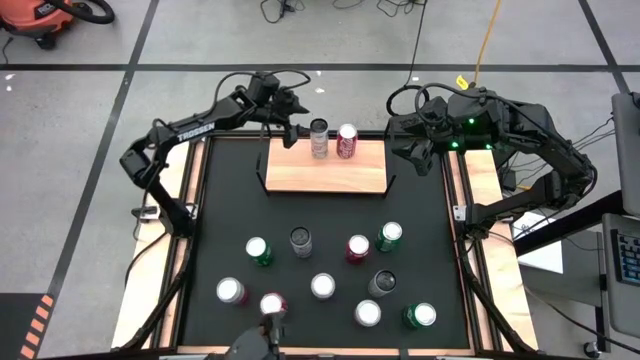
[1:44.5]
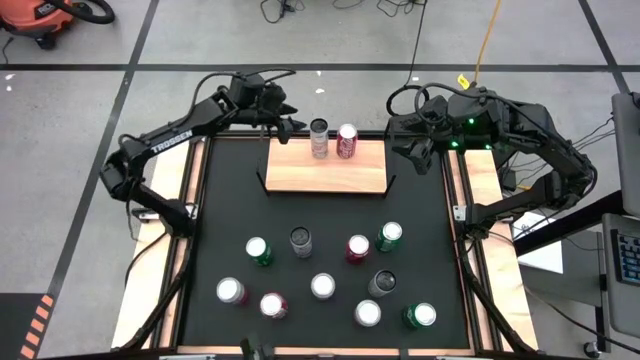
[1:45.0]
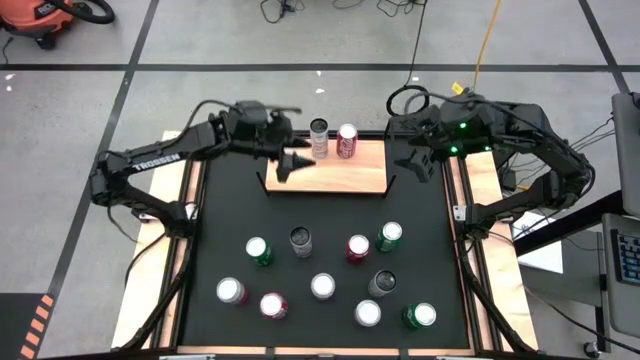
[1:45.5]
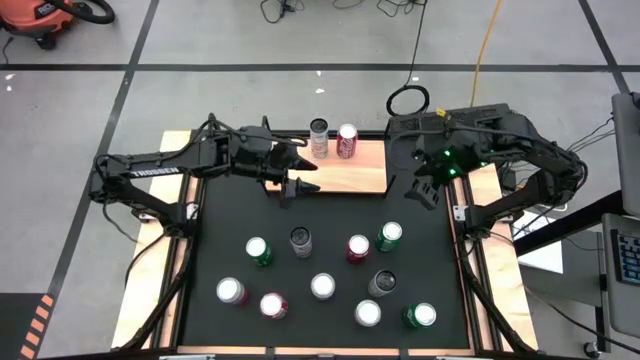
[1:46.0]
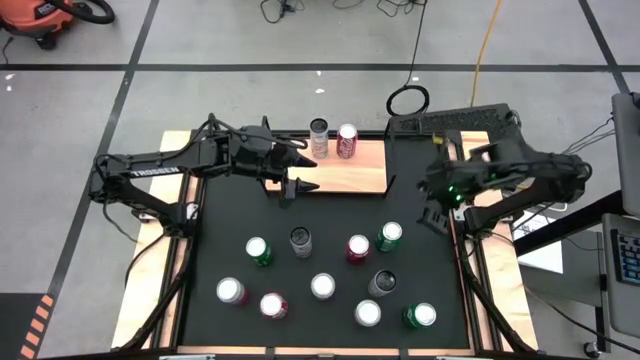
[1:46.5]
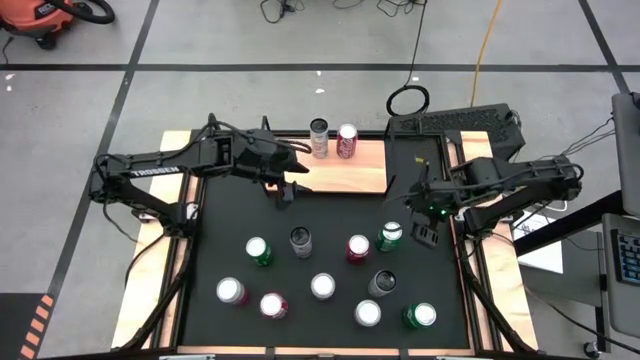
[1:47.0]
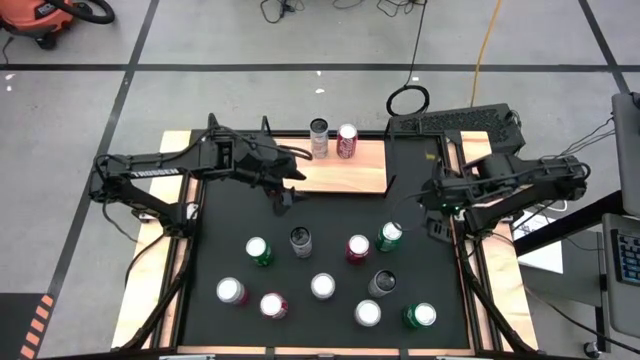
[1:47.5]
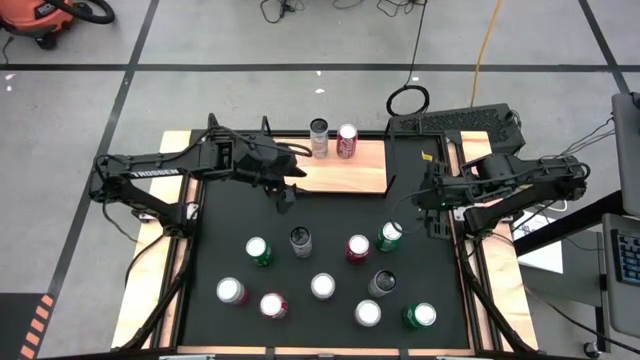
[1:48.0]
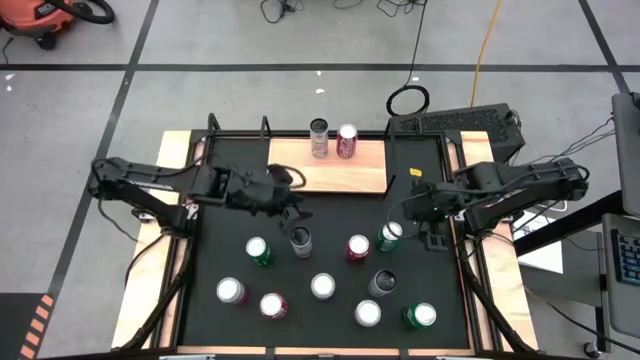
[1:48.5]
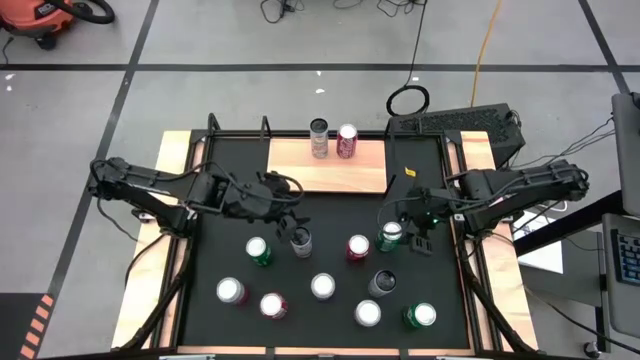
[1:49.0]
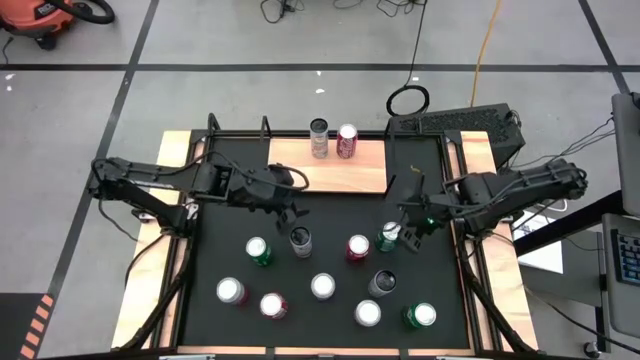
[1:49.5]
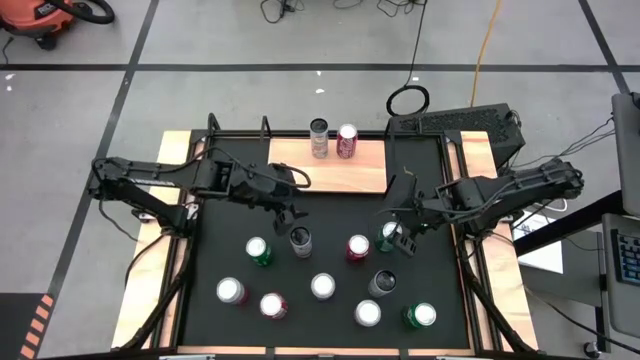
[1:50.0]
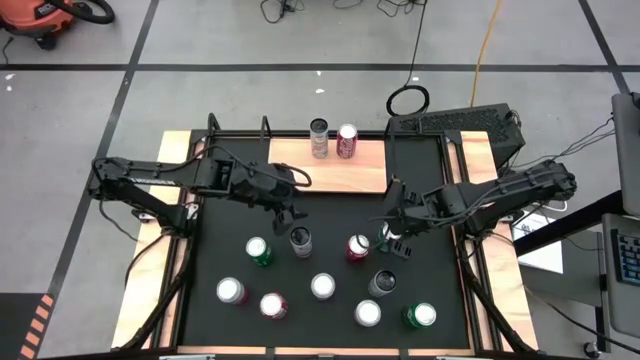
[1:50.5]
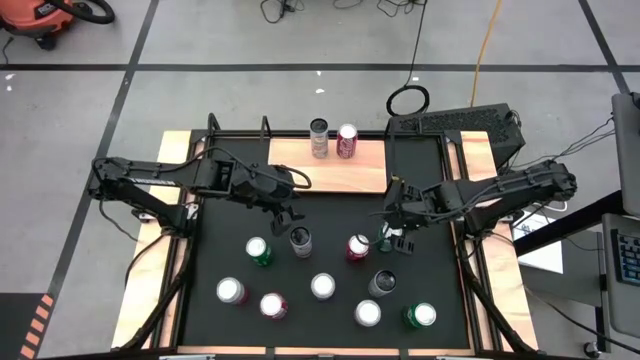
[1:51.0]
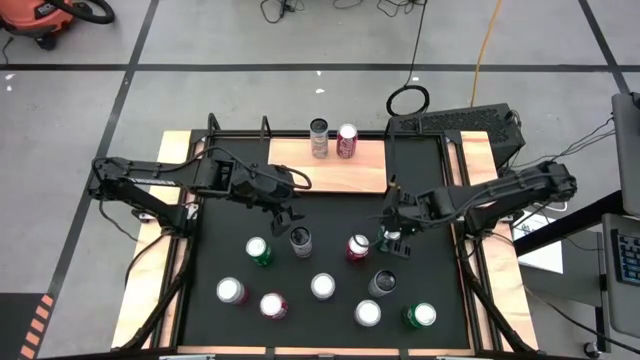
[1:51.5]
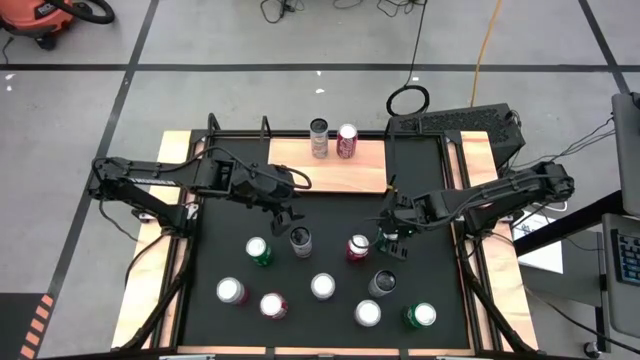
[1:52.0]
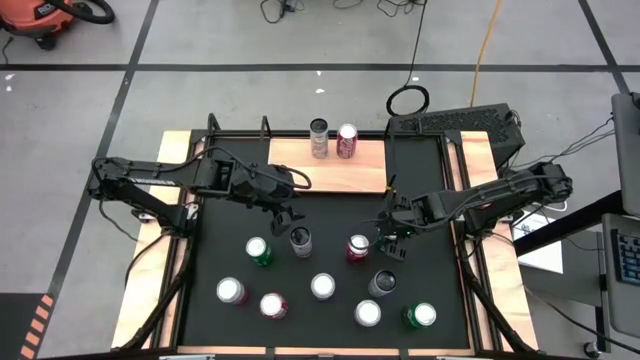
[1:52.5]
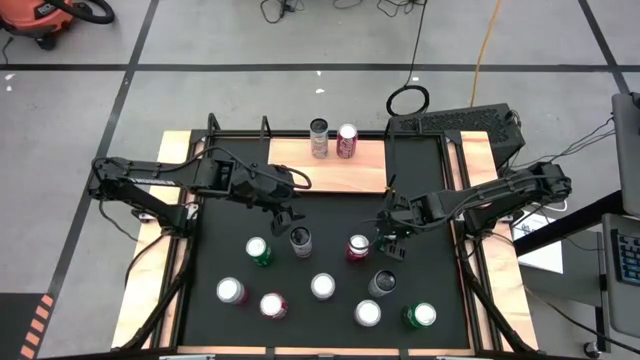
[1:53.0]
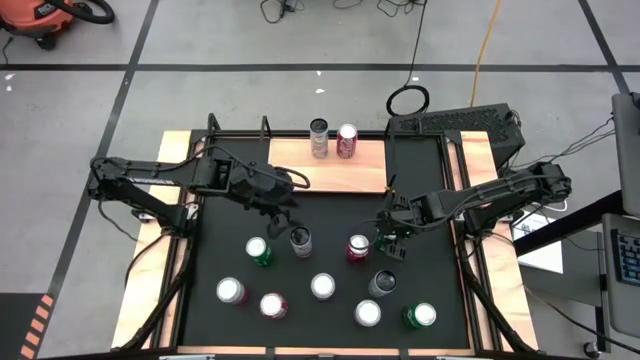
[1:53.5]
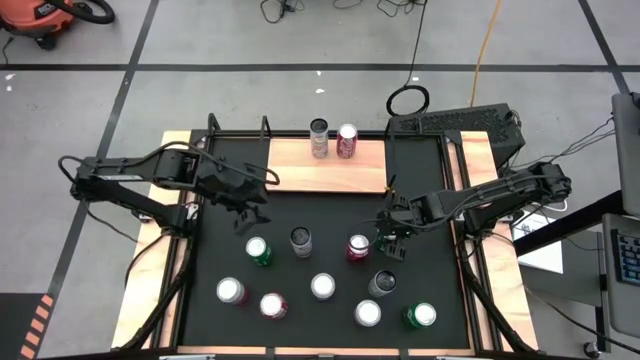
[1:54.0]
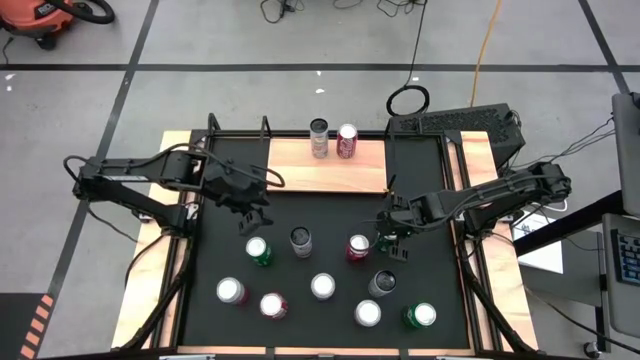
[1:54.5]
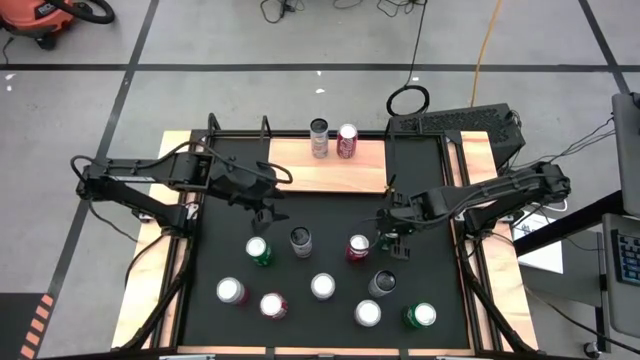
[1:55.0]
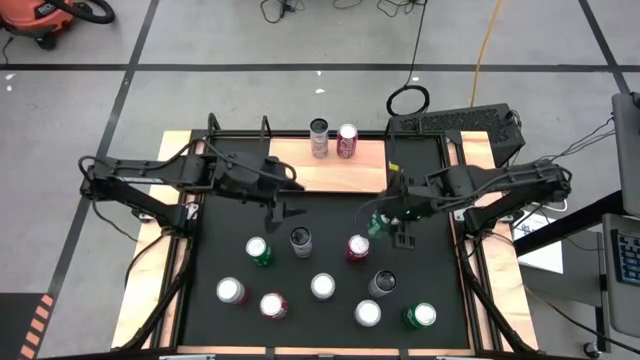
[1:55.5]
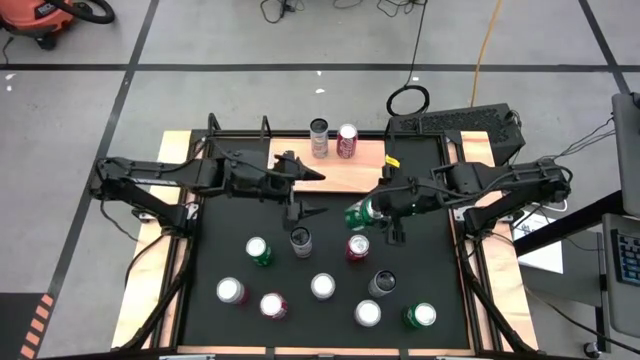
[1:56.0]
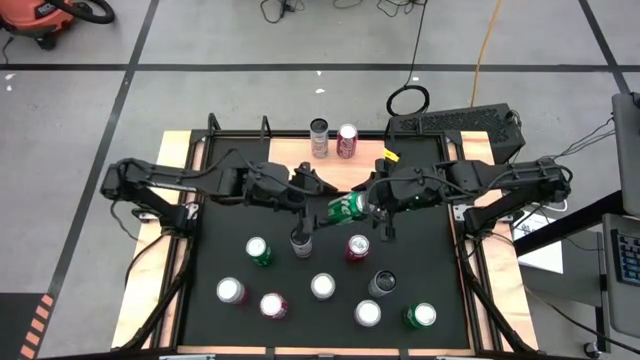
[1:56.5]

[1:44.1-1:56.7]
Task: Place canned beverage on shelf
Put the top right green soda can on the shelf

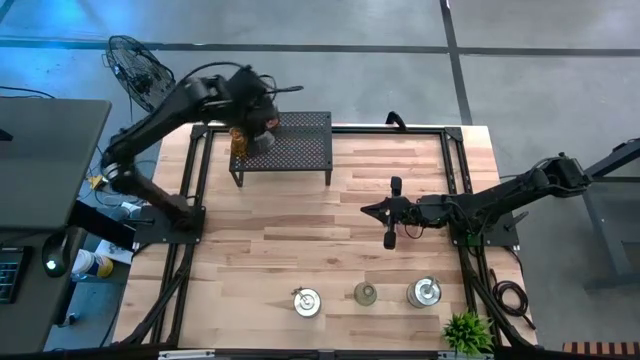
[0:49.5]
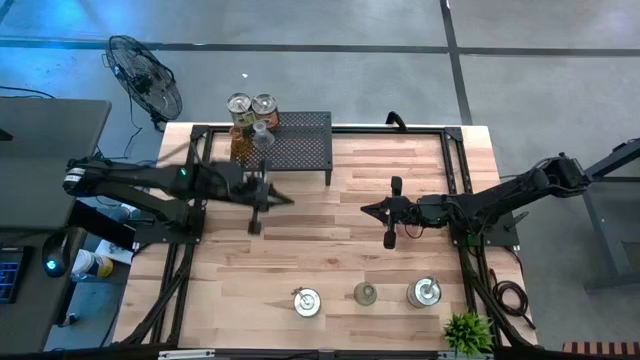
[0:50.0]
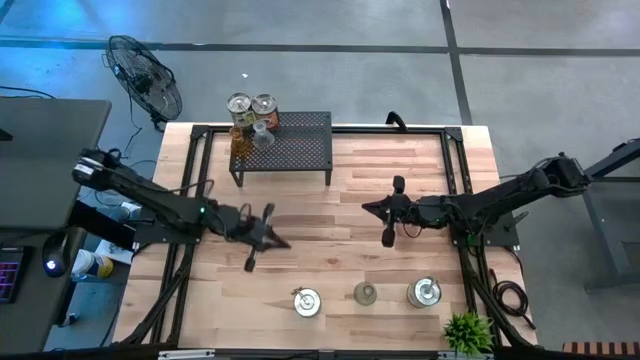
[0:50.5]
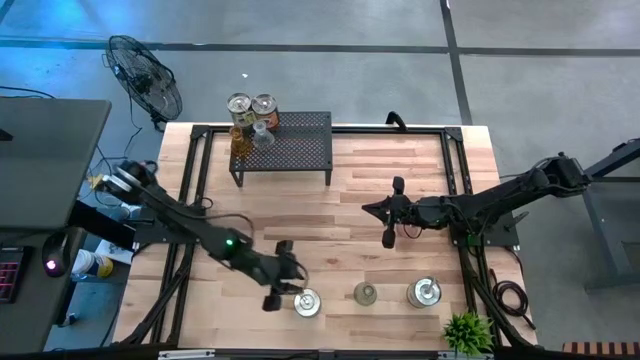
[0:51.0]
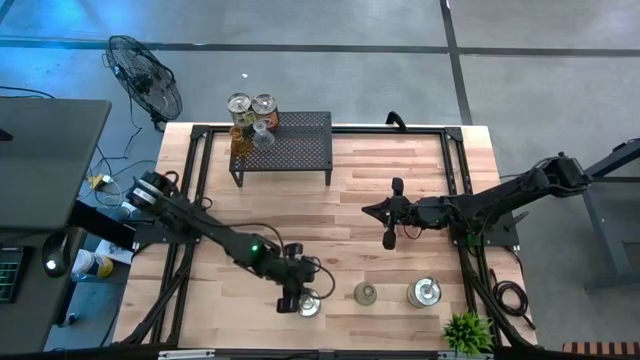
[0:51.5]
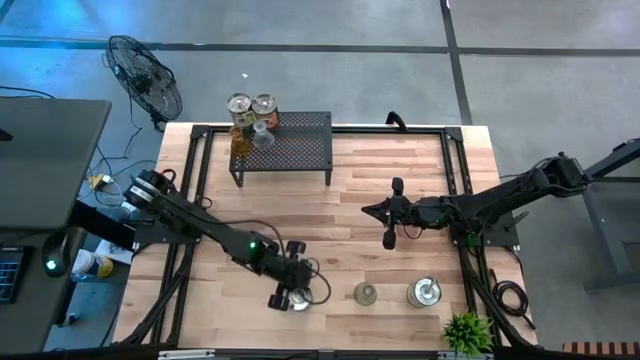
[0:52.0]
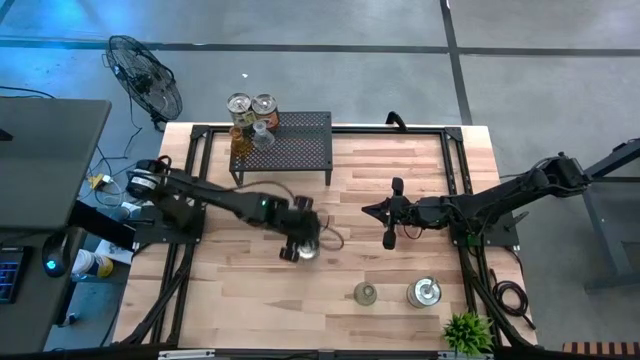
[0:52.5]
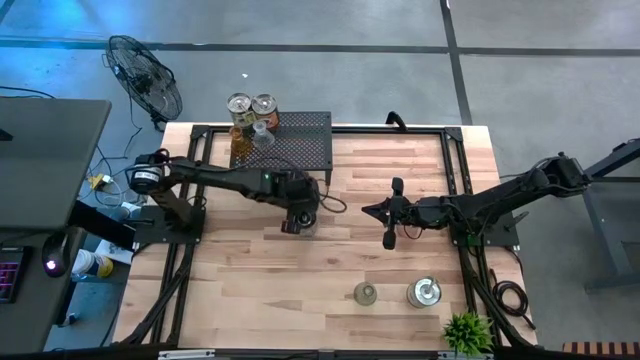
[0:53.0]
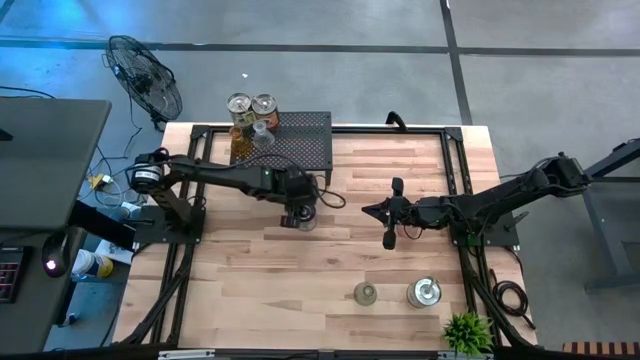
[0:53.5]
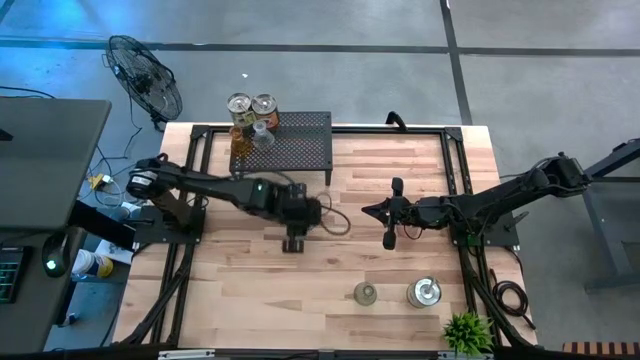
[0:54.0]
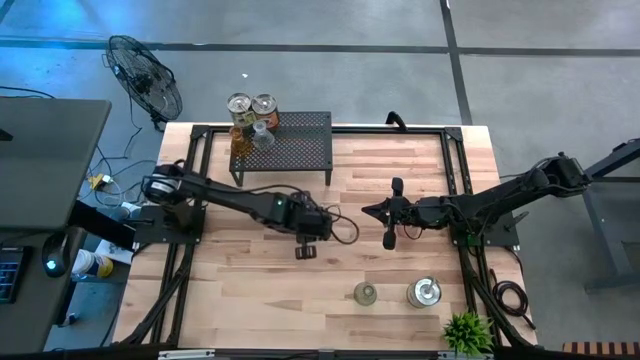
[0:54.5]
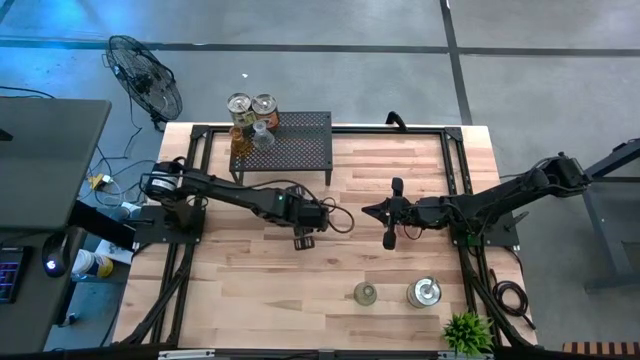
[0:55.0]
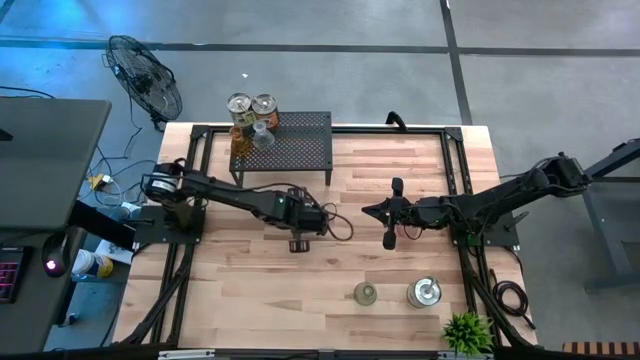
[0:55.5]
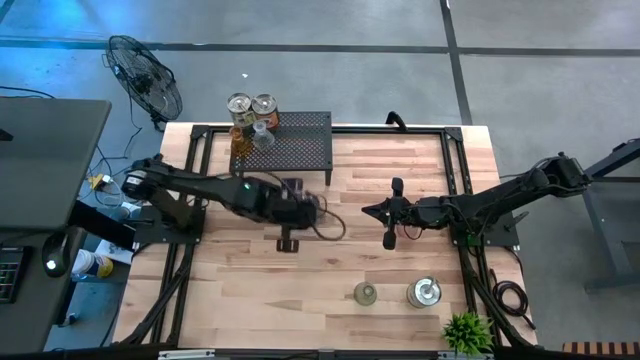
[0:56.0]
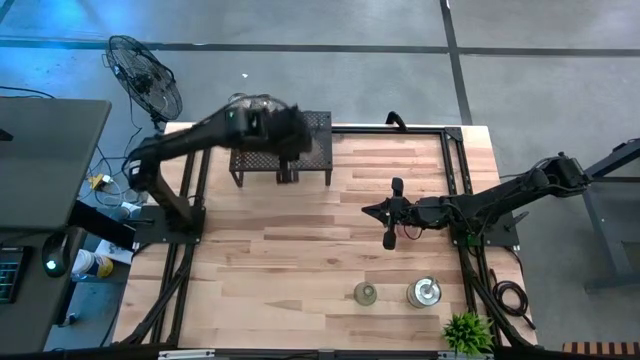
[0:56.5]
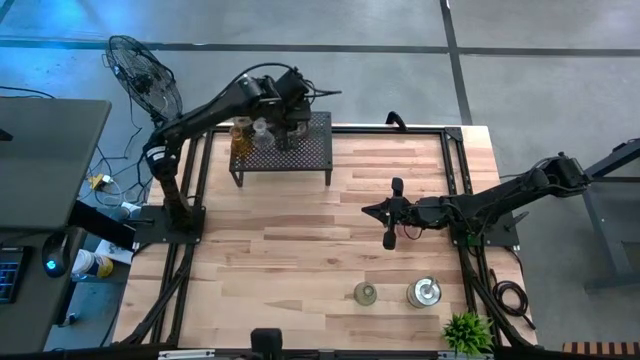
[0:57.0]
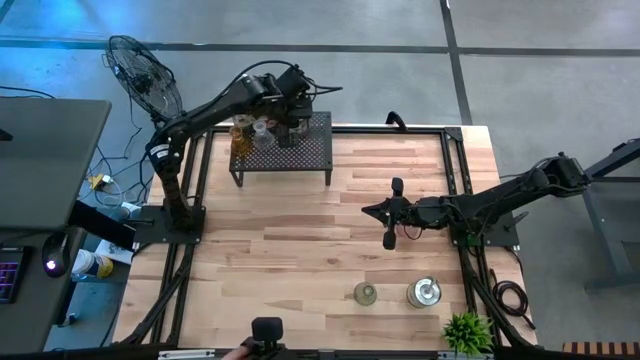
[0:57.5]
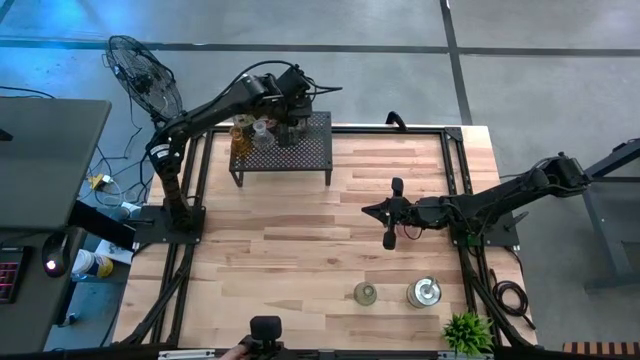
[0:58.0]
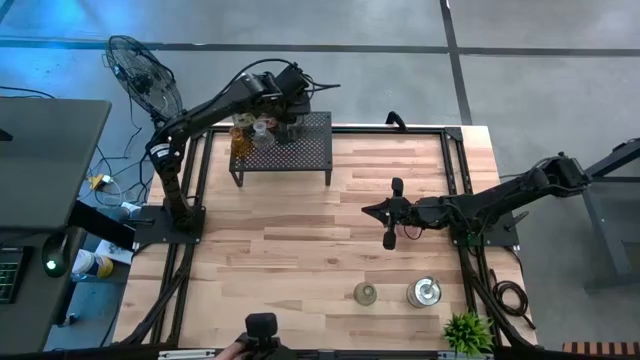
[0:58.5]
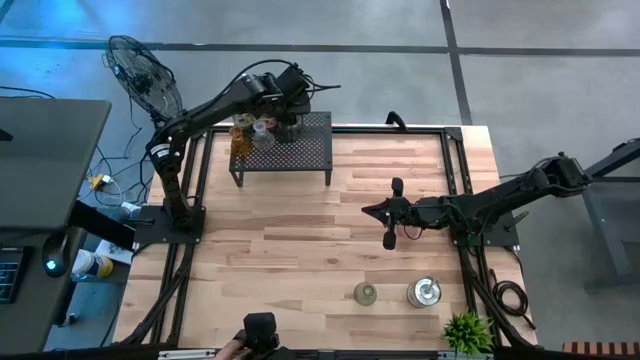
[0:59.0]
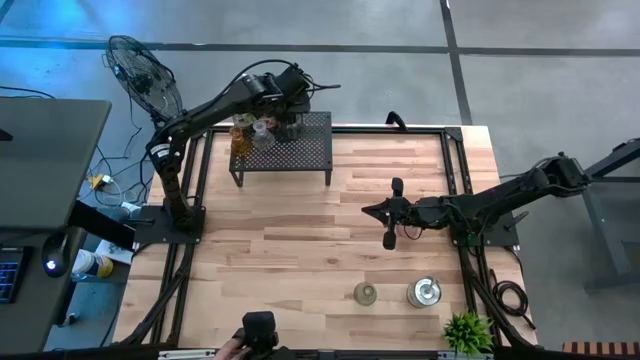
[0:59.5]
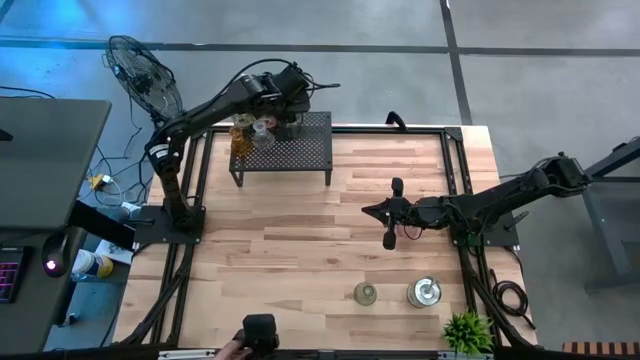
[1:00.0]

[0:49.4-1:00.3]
Task: Pick & Place candle stick holders
Put the red scented candle on the shelf
